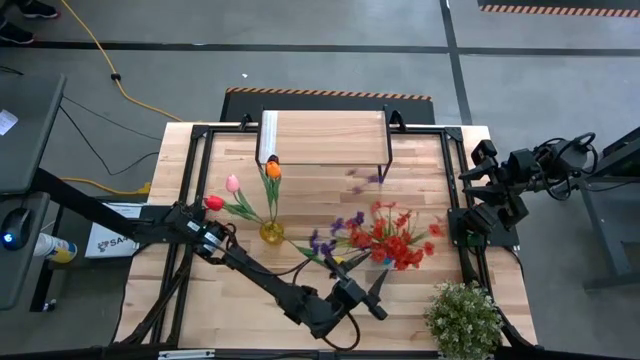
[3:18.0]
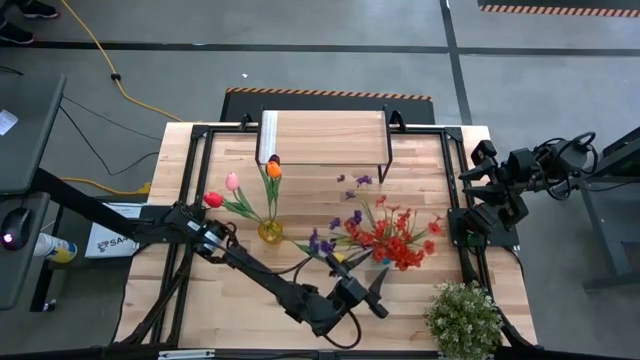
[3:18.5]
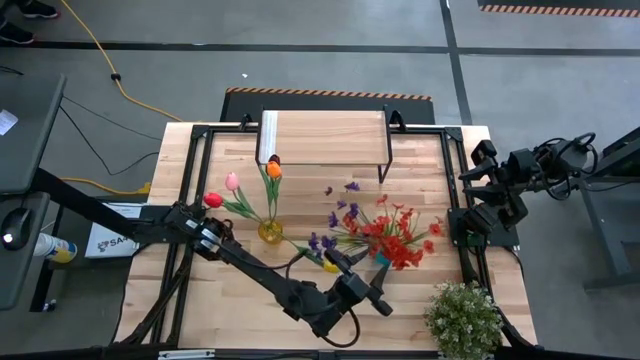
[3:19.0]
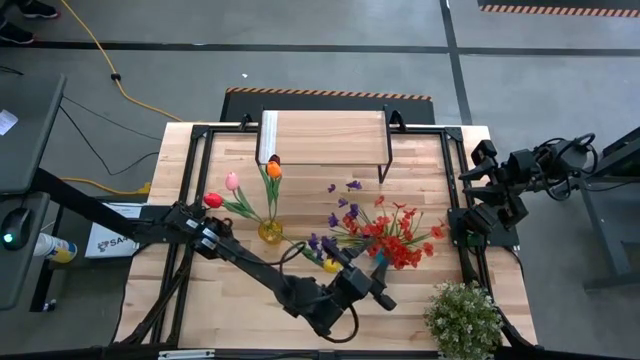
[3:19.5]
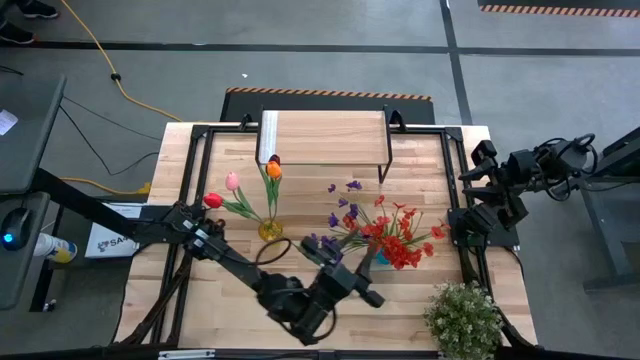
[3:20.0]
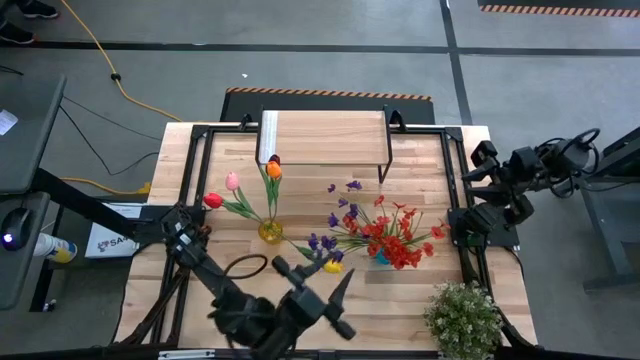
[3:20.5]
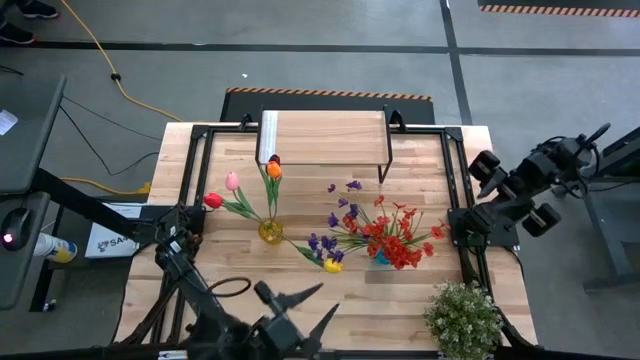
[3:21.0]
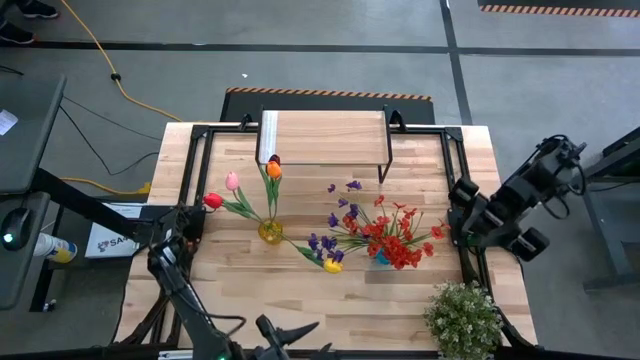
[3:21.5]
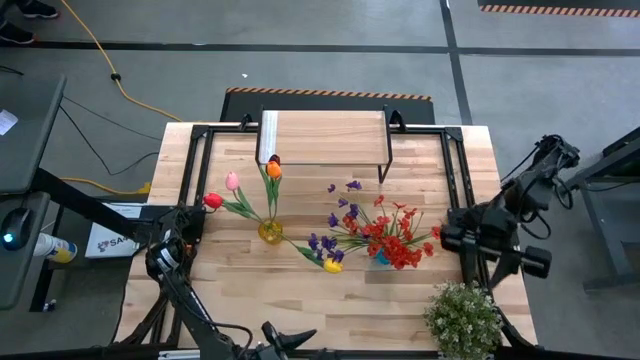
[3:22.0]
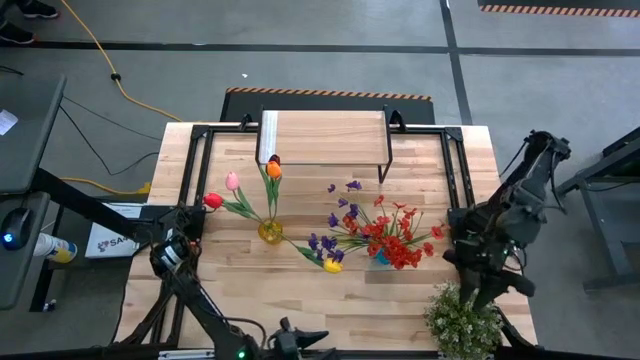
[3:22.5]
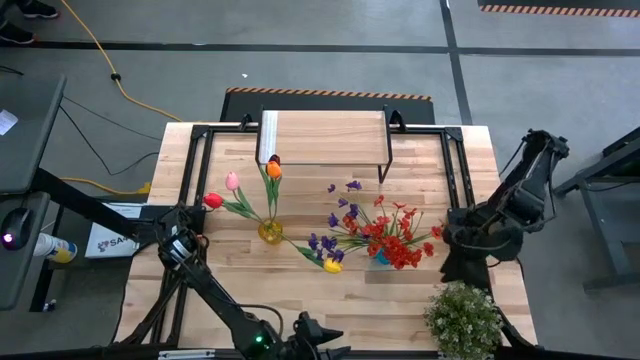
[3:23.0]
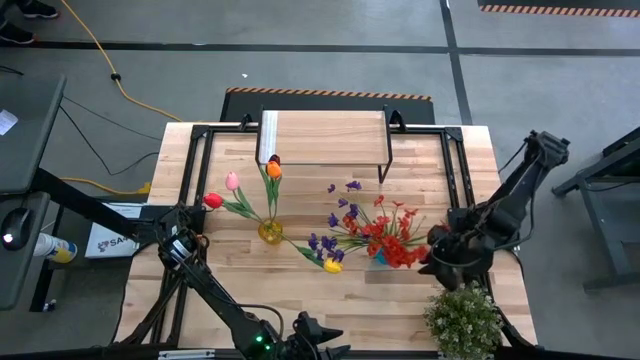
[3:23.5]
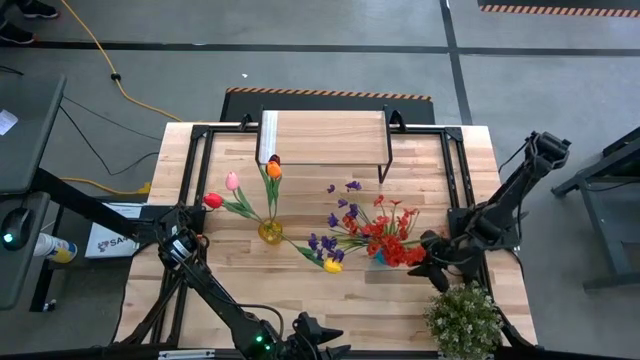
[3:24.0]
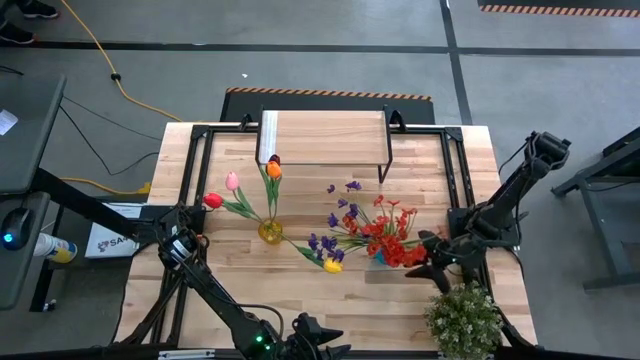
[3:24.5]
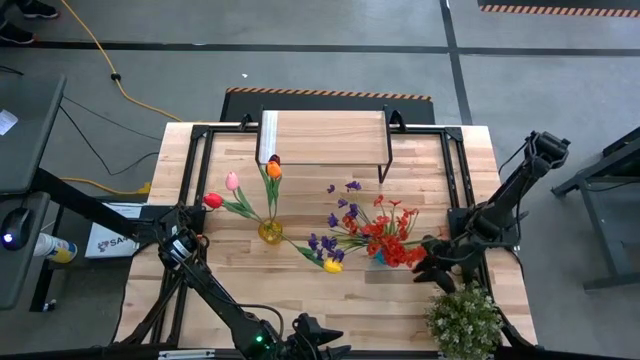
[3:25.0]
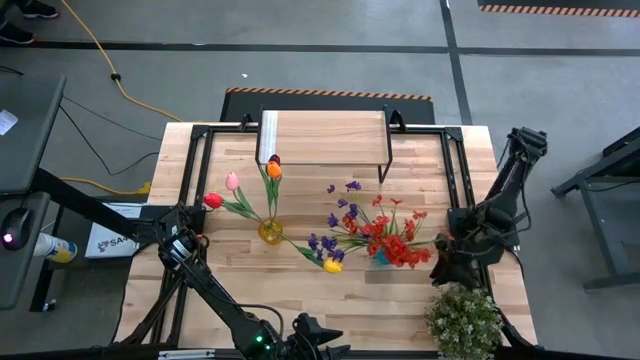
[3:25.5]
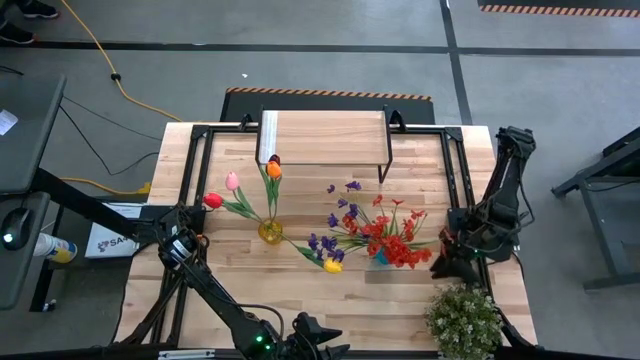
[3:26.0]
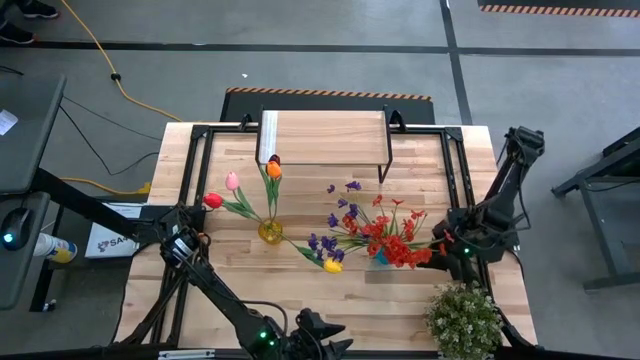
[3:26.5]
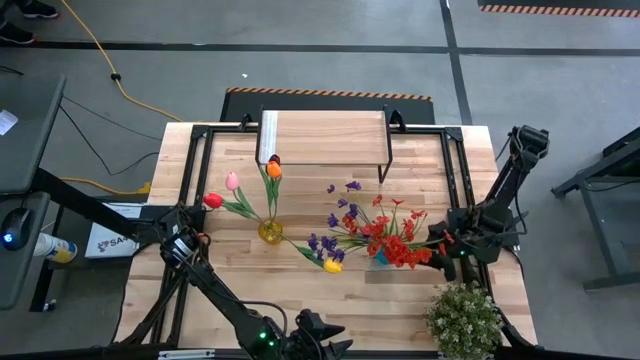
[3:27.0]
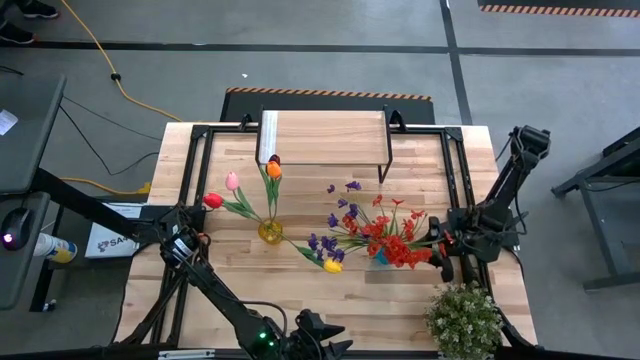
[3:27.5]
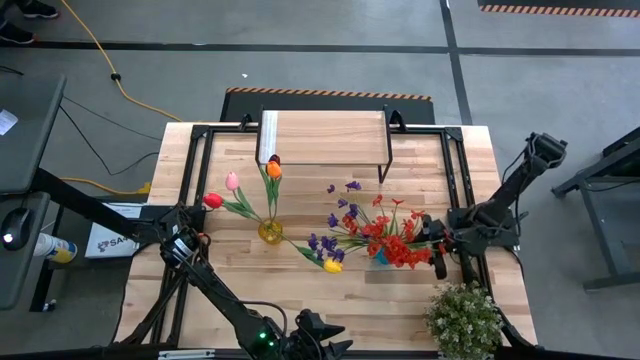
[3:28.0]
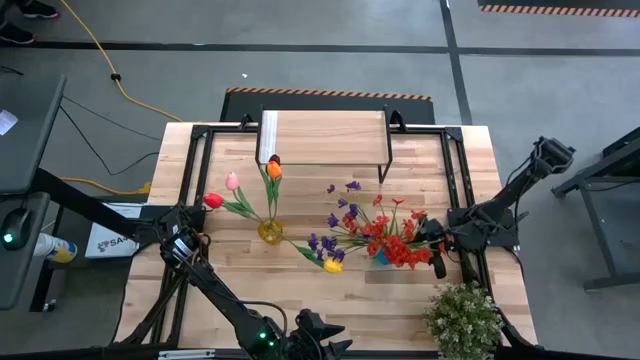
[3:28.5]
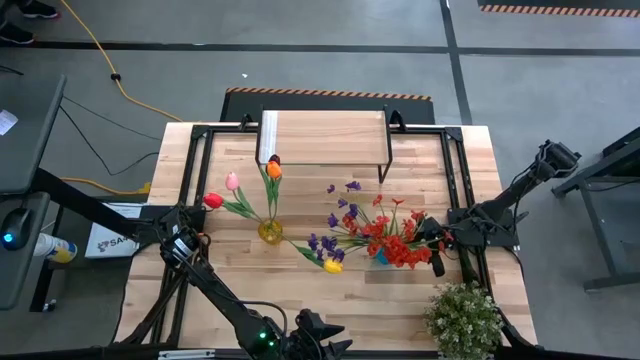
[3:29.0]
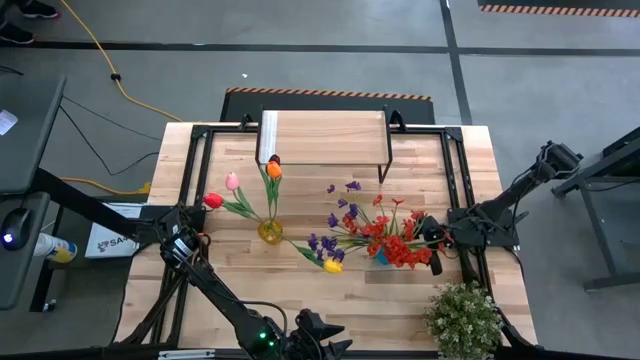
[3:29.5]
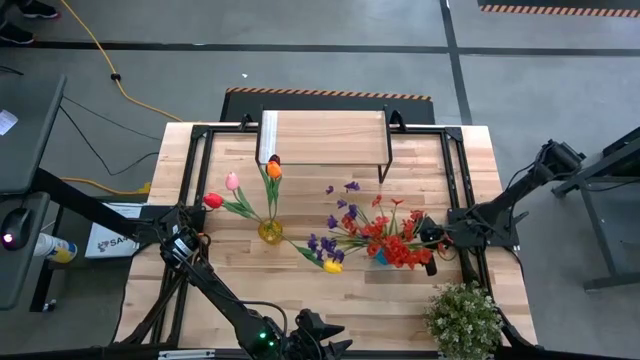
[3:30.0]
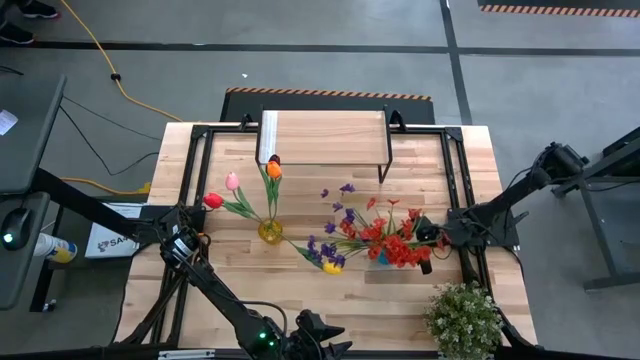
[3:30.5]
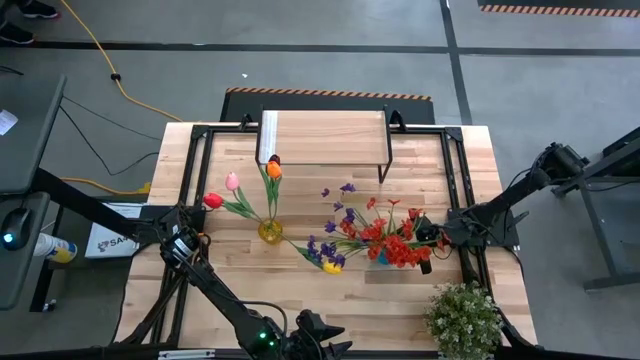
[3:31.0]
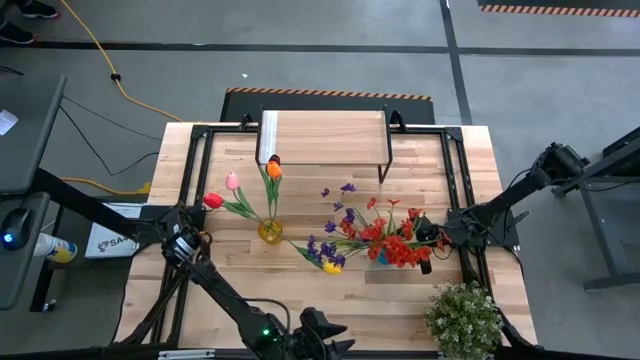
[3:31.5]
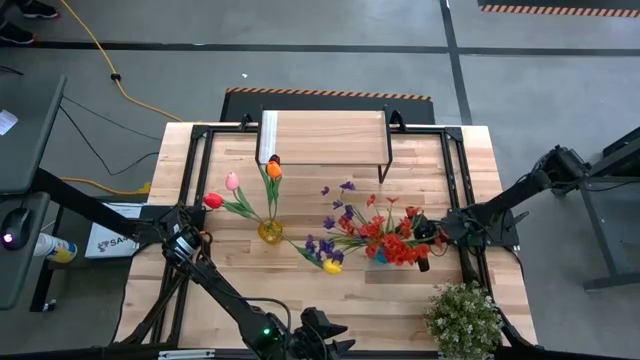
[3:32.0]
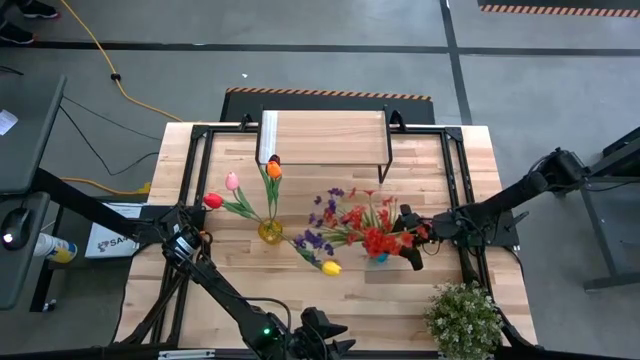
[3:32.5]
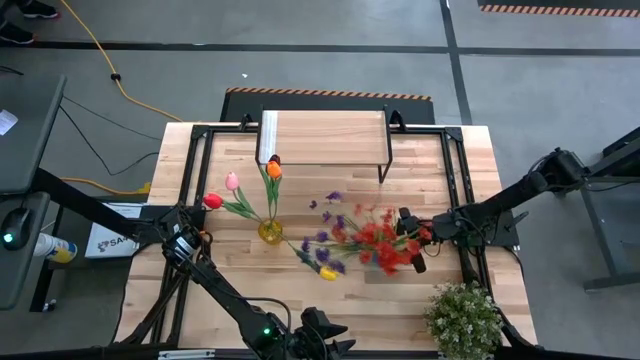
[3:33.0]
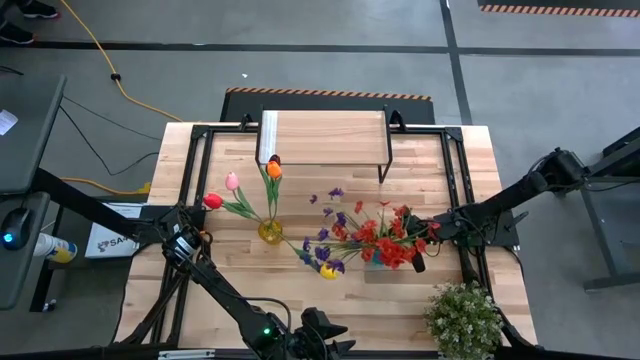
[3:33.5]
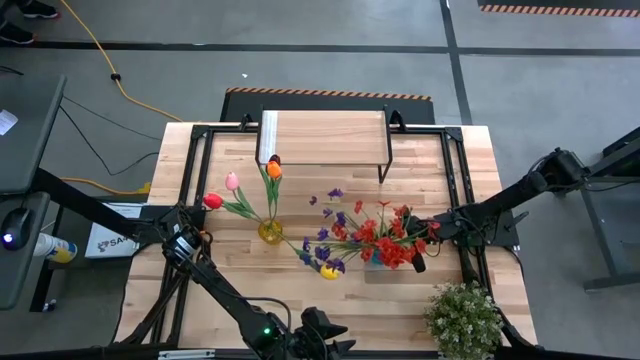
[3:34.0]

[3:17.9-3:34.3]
Task: Pick and place flowers into a vace then onto a shelf
Put the blue vase with flowers on the shelf

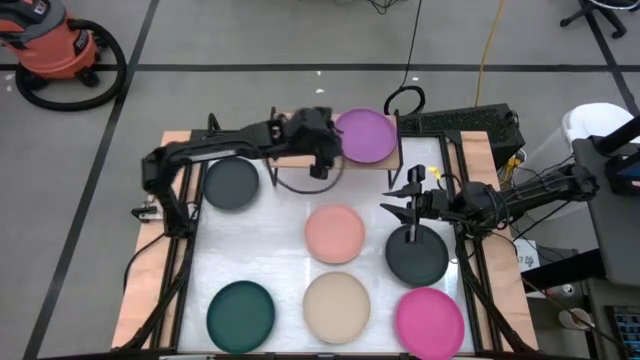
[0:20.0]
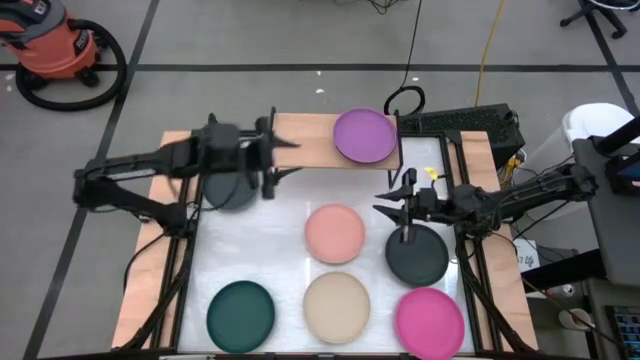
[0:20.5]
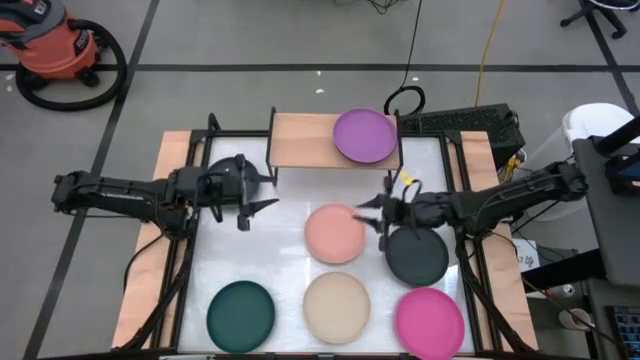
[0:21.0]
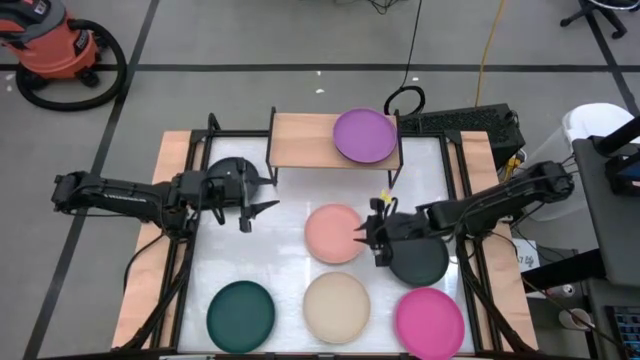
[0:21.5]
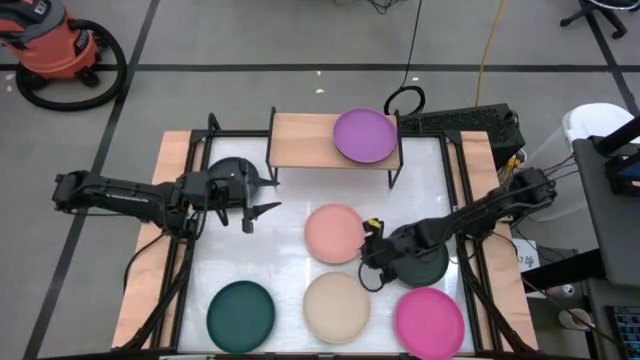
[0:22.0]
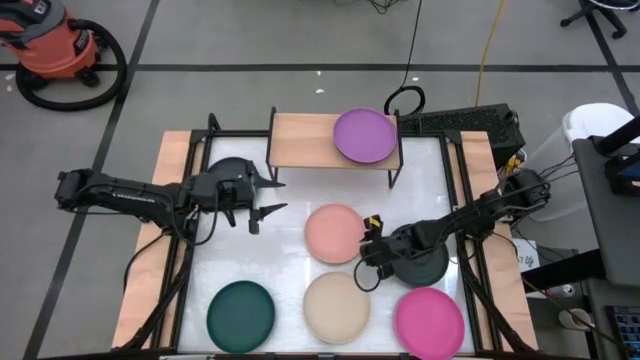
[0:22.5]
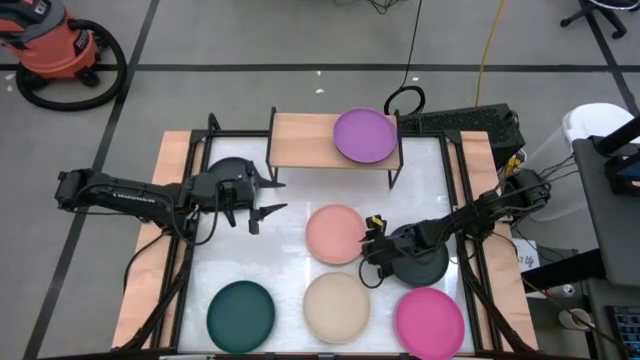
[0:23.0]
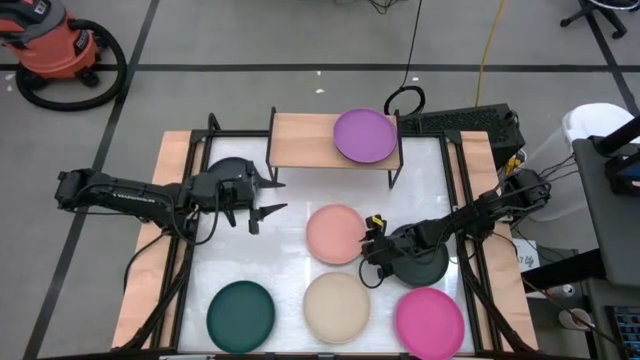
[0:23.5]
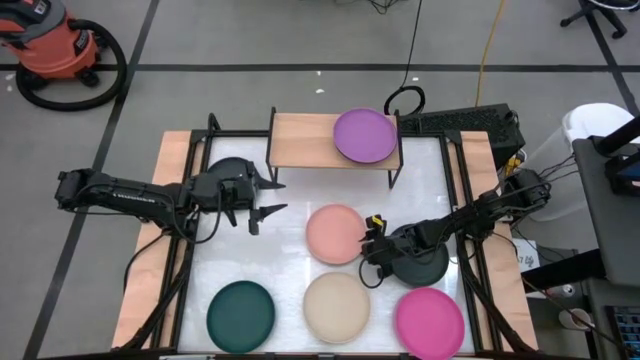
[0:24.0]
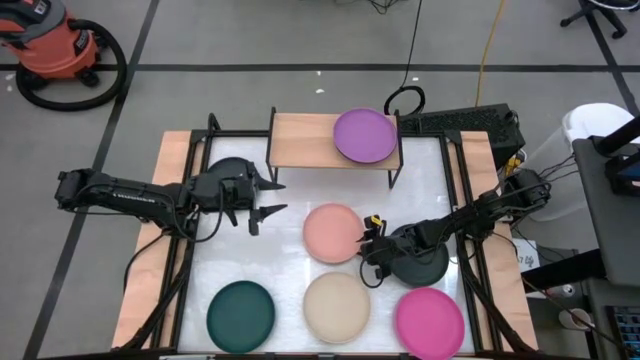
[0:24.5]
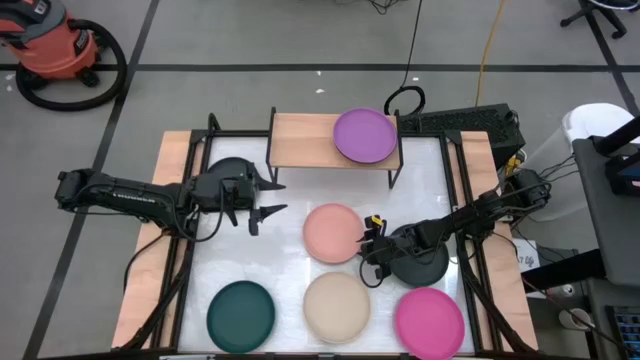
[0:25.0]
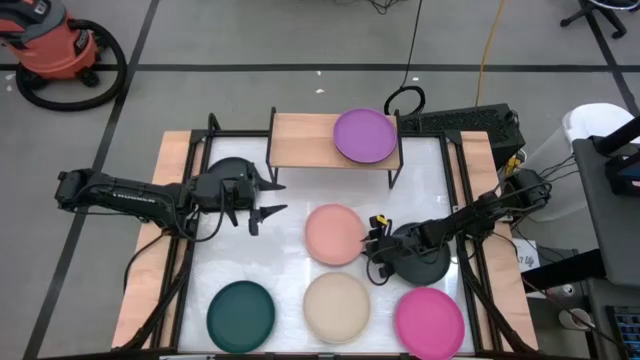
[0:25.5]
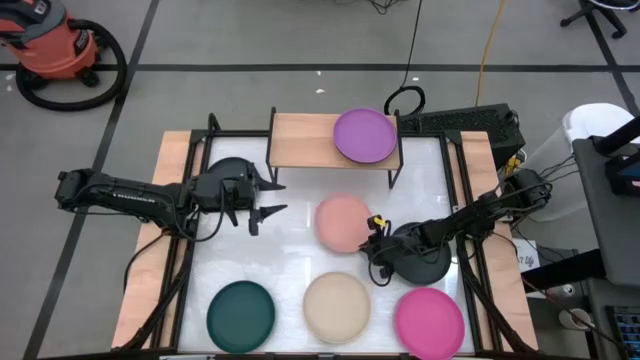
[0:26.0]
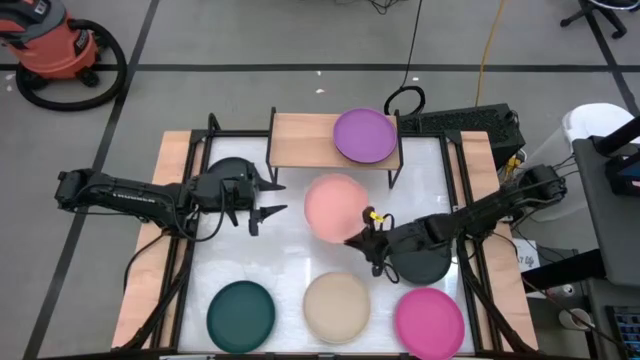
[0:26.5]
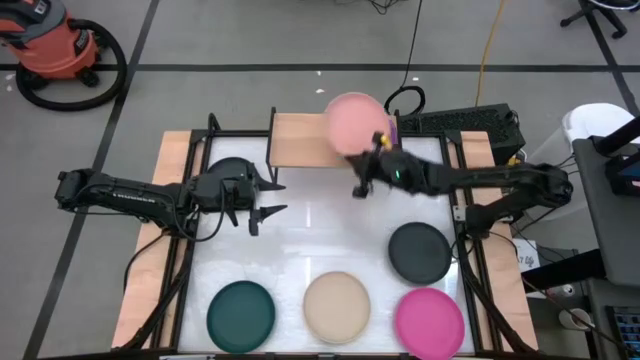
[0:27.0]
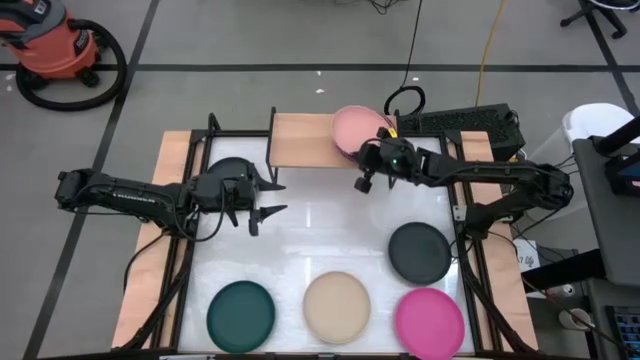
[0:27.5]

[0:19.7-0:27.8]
Task: Place and stack plates onto a shelf
Stack the light orange plate on top of the violet plate on the shelf
